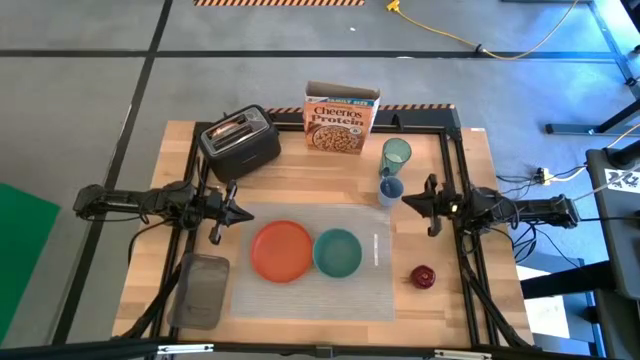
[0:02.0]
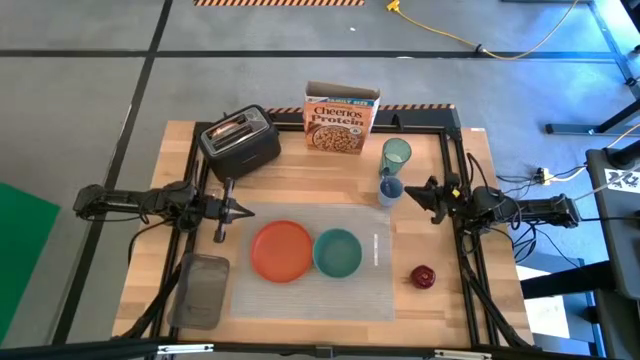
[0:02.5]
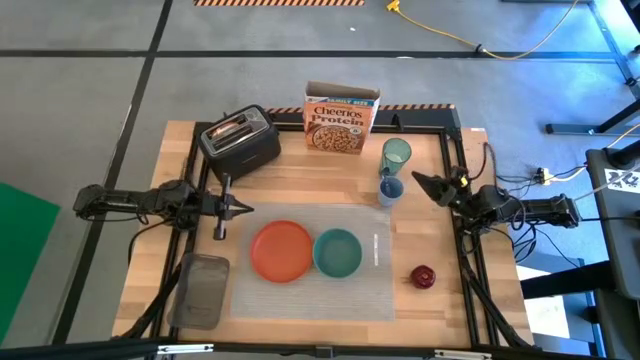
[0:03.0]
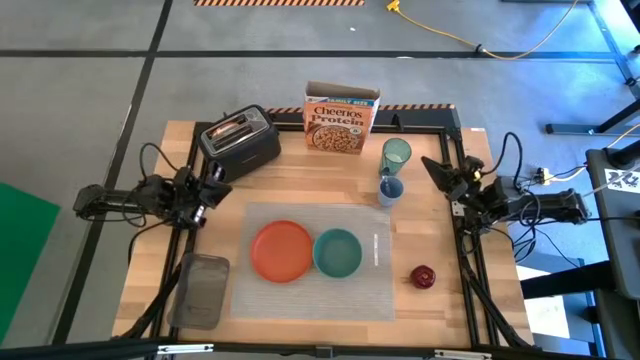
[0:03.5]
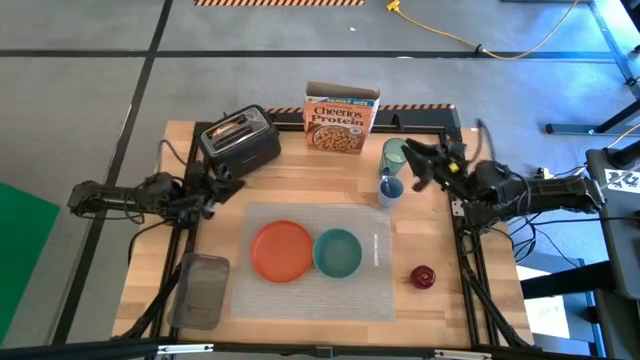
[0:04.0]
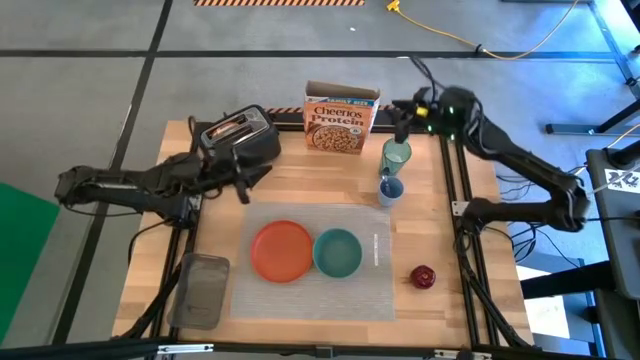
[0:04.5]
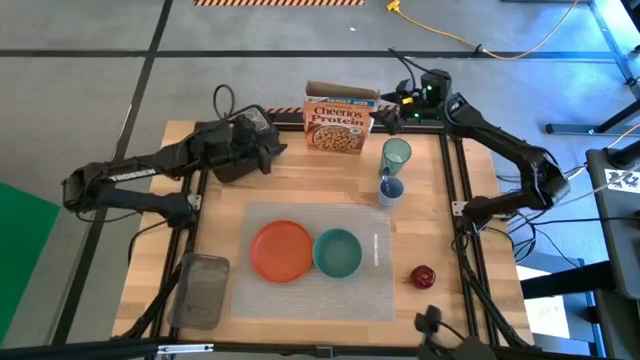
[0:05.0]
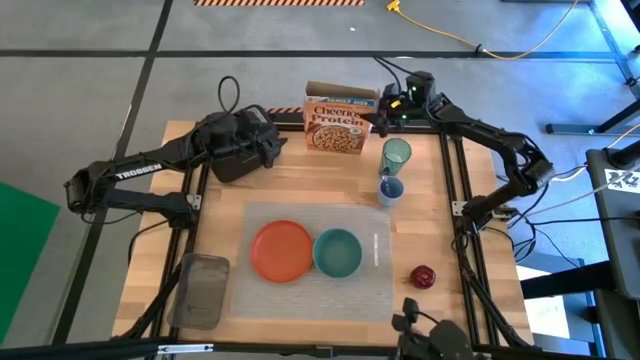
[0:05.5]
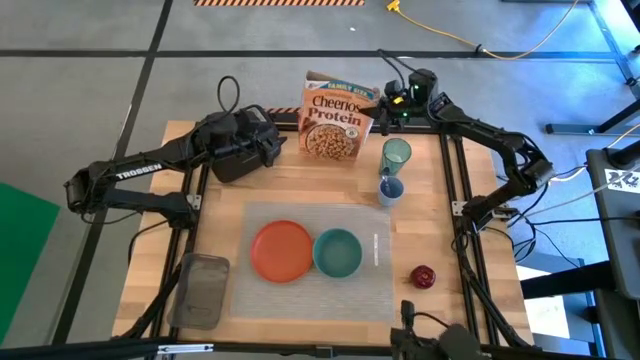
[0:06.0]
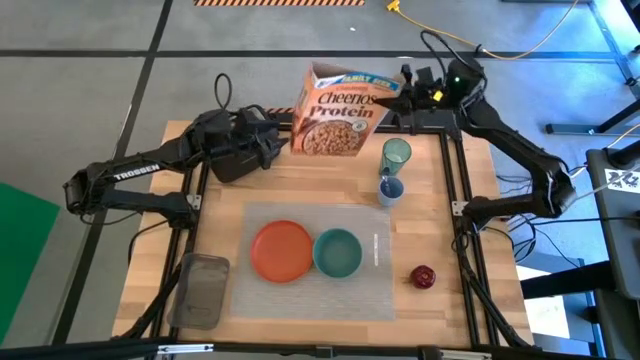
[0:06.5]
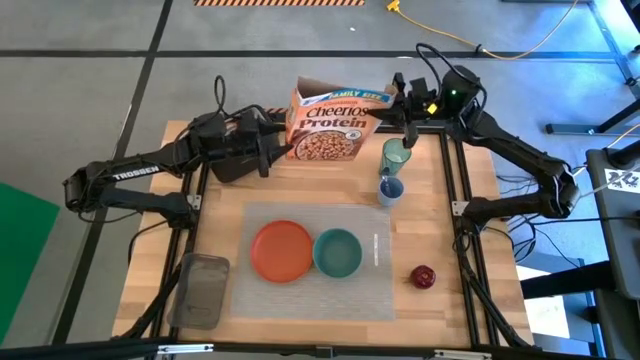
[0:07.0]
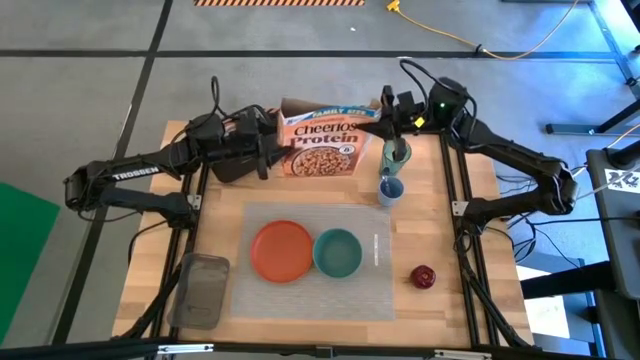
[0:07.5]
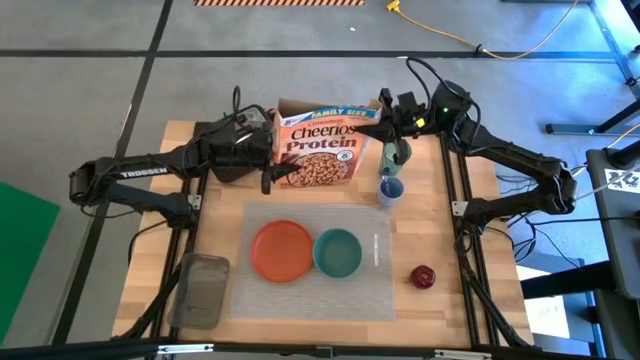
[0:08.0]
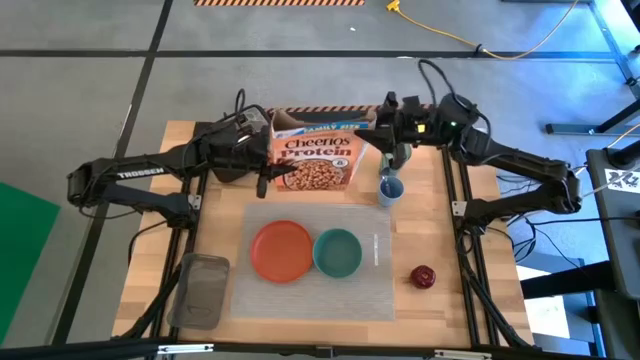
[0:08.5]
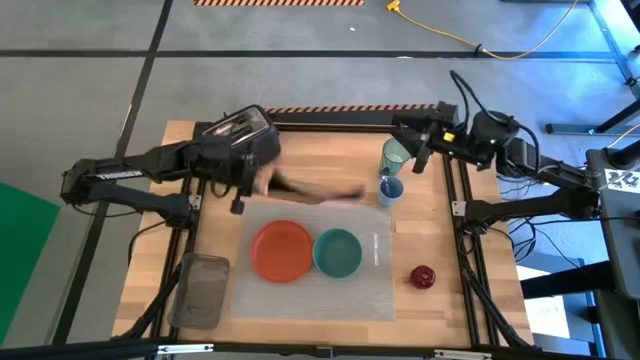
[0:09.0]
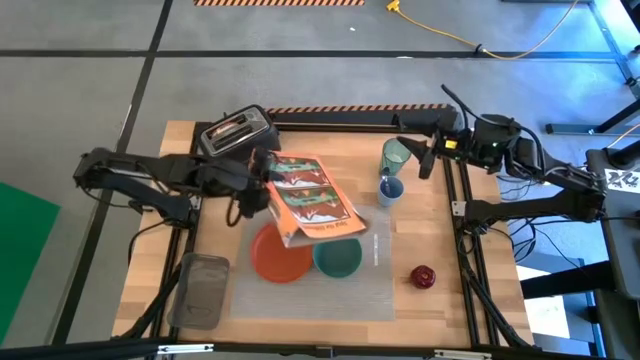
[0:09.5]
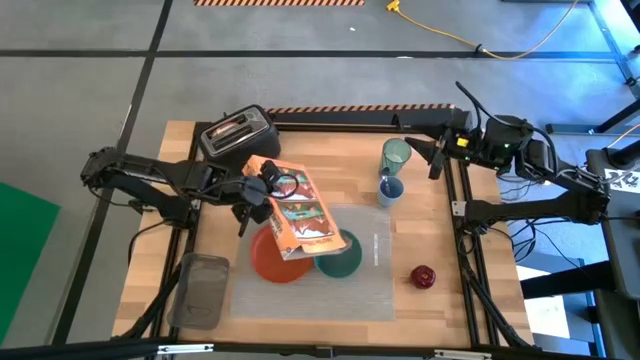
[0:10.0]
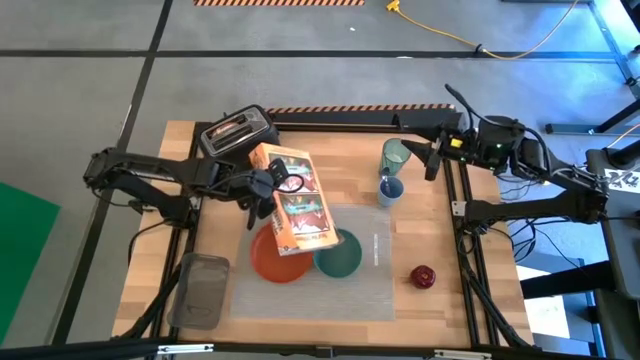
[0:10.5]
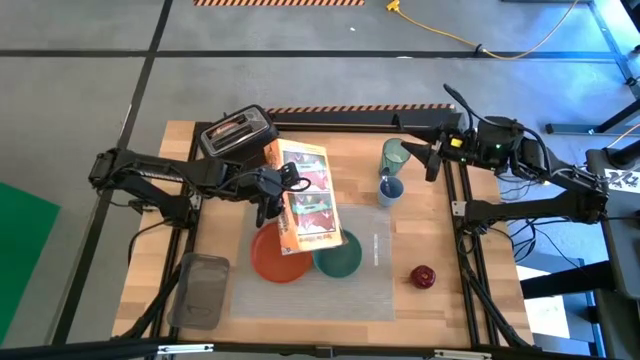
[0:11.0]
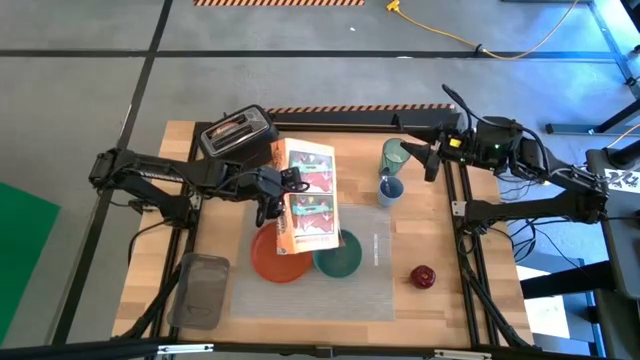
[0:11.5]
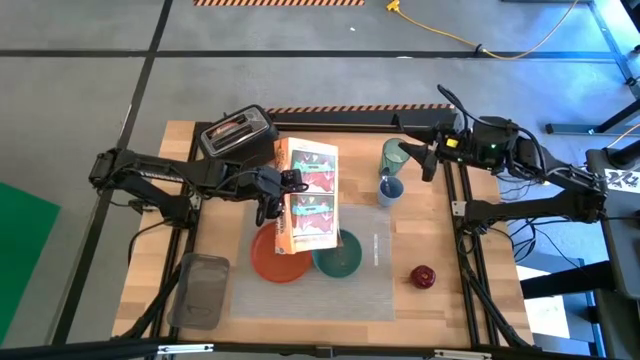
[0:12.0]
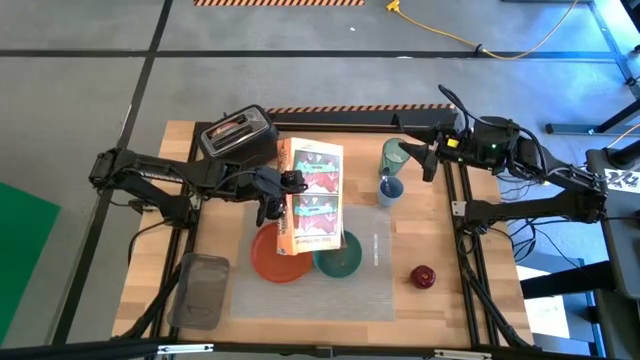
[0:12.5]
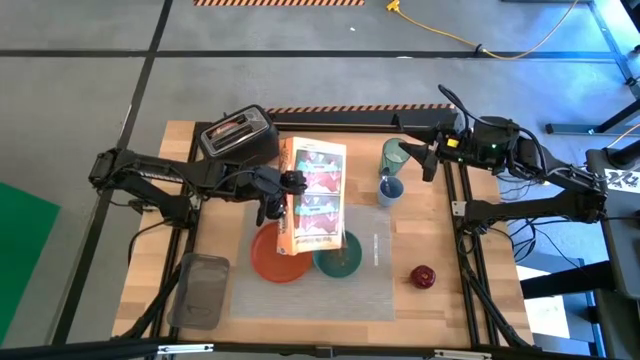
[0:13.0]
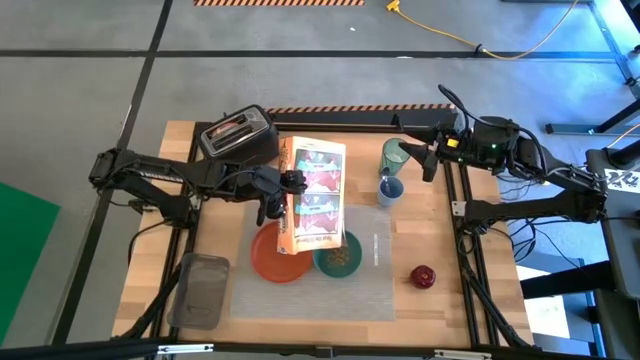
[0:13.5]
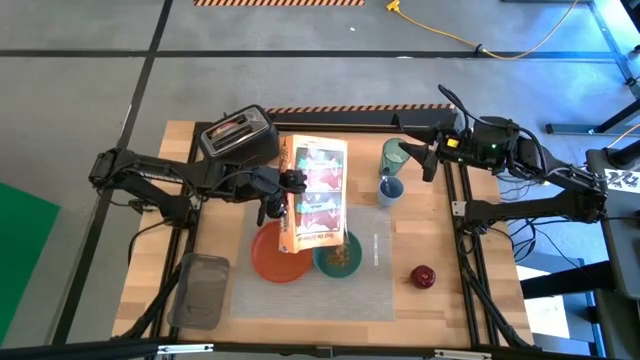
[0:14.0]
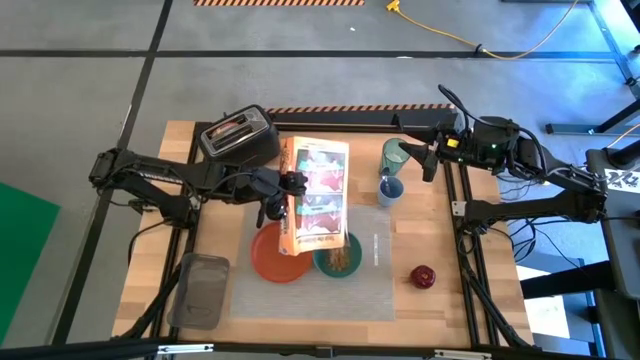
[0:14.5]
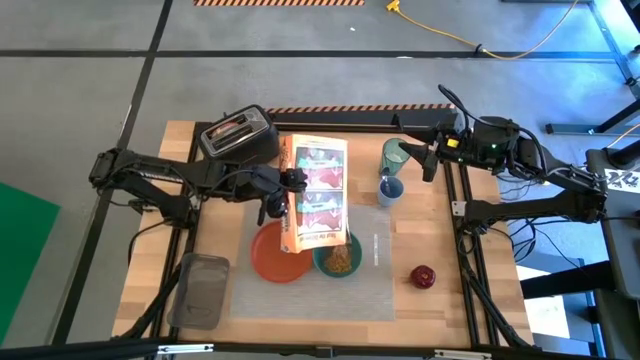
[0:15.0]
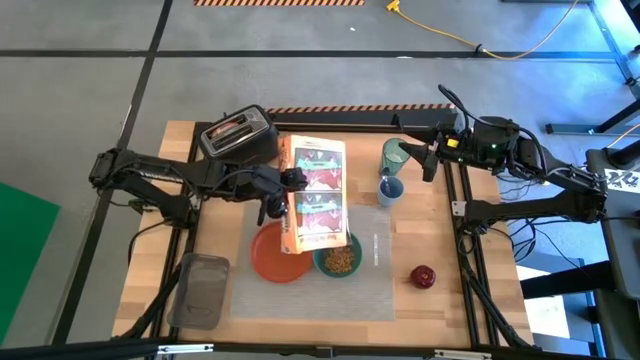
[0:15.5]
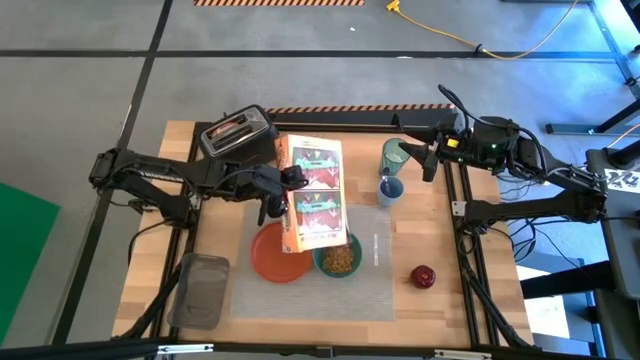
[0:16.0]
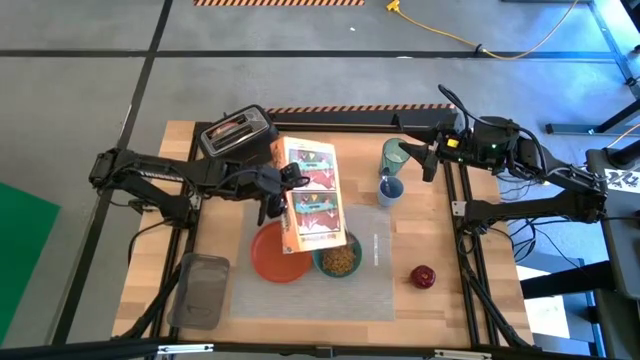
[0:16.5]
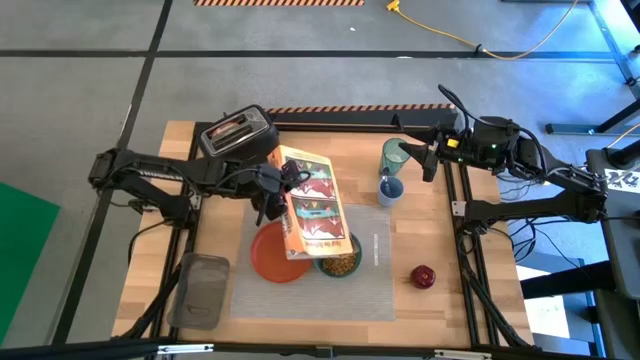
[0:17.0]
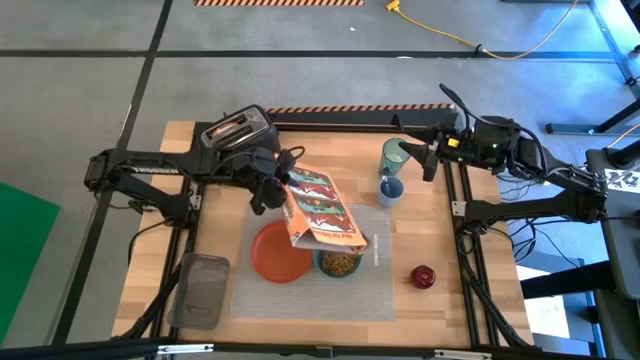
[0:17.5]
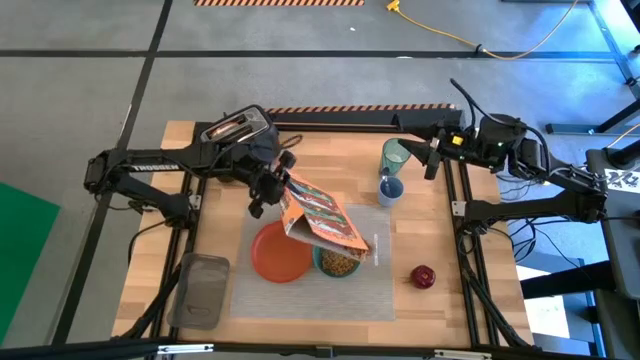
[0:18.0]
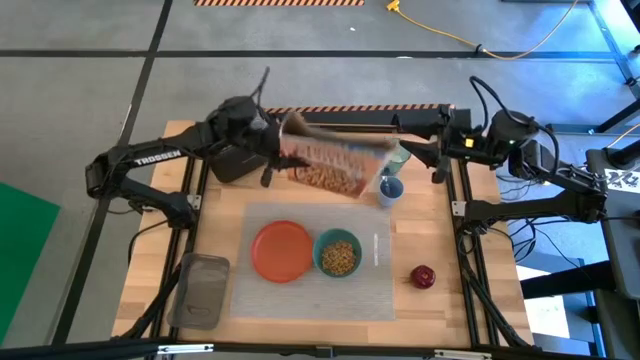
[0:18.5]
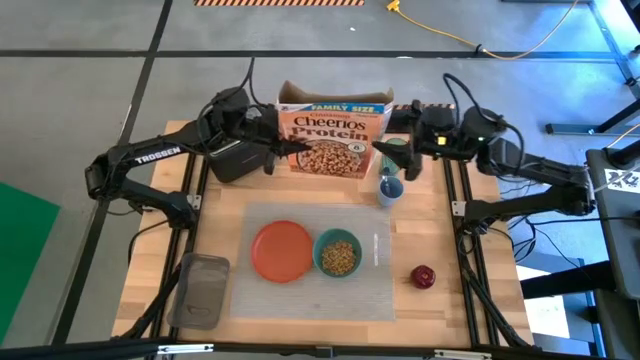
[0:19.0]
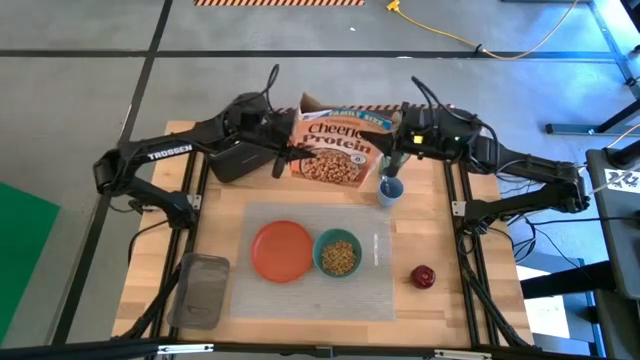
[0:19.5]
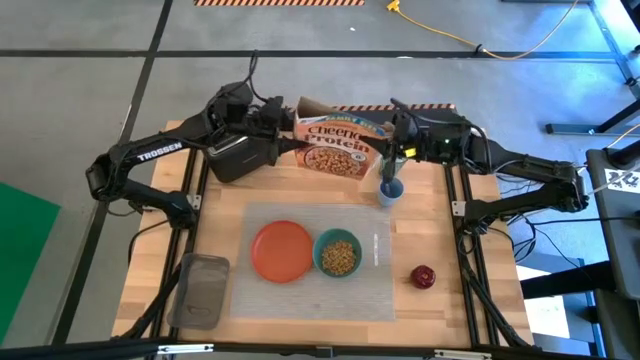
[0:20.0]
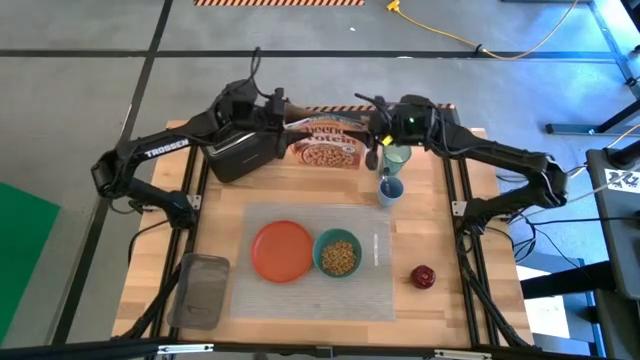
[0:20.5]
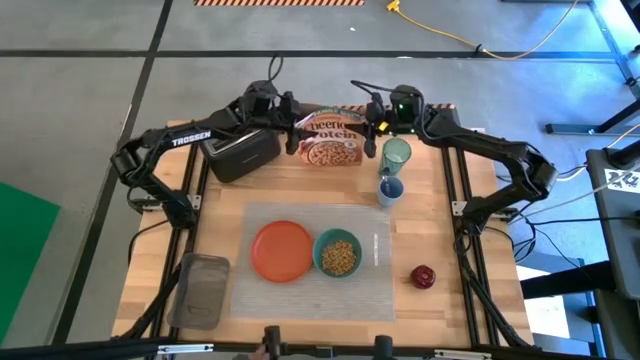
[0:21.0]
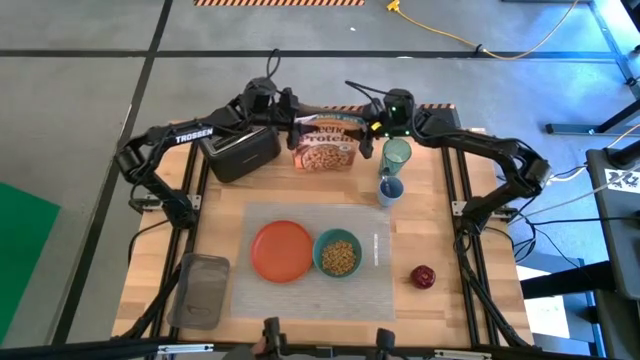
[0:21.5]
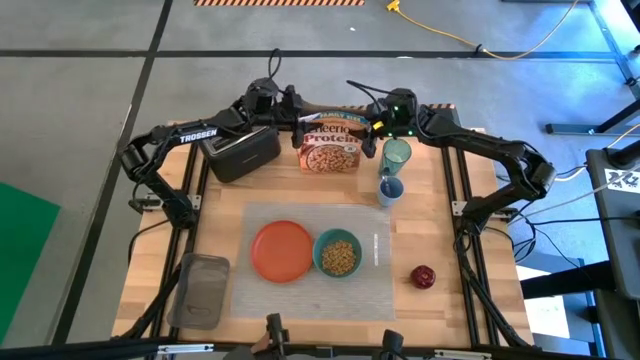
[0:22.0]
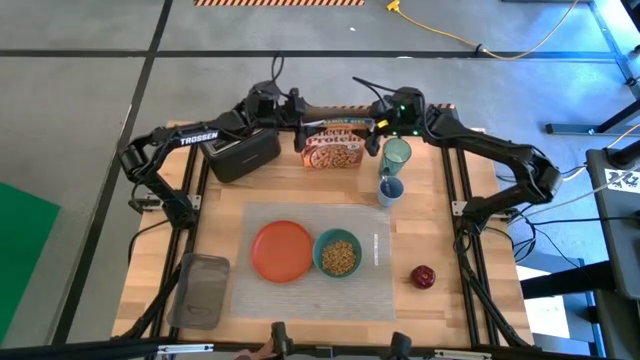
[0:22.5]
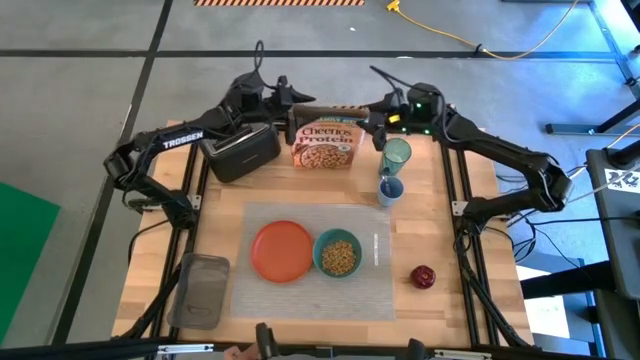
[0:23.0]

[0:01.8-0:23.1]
Task: Arrange a breakfast setting
Pour the cereal into the blue bowl
